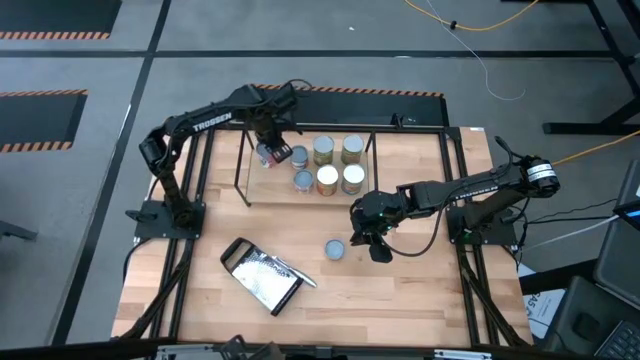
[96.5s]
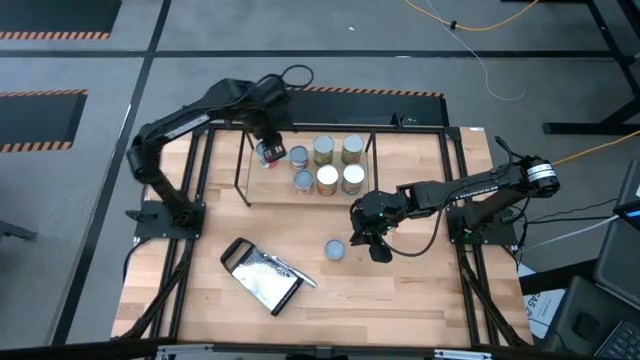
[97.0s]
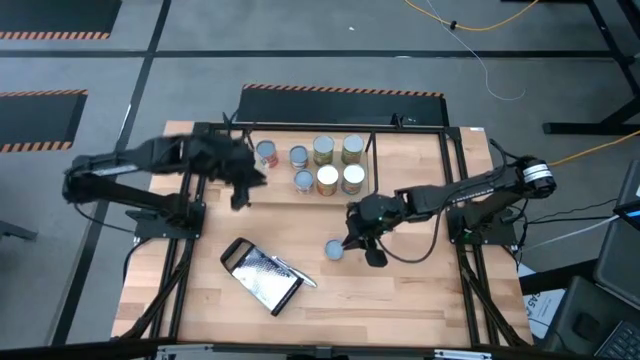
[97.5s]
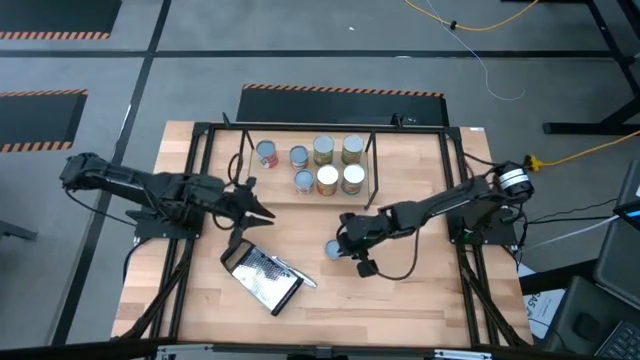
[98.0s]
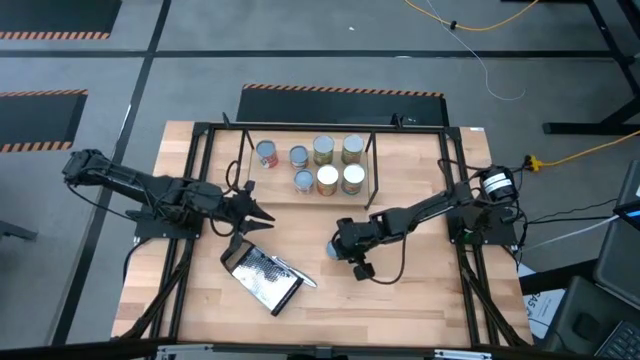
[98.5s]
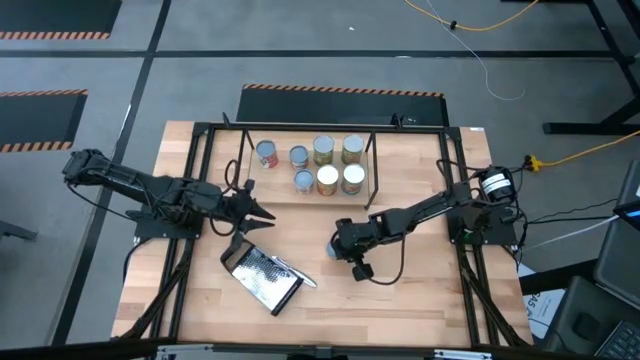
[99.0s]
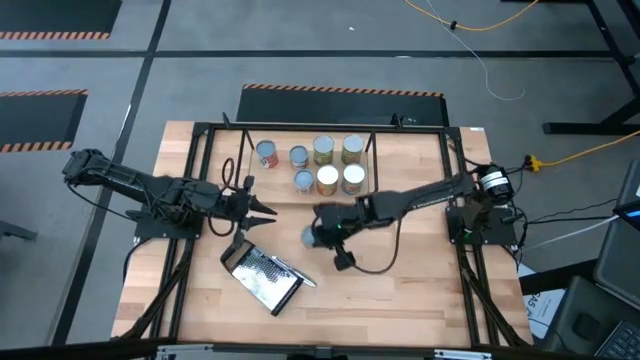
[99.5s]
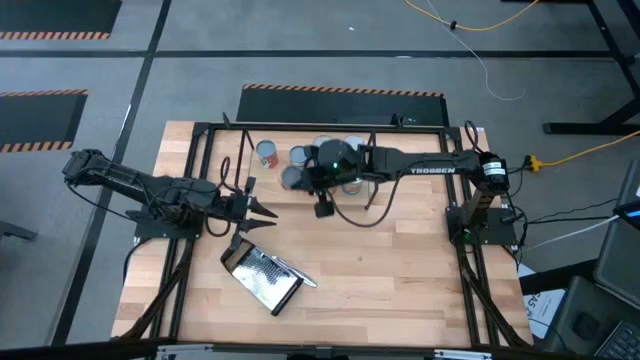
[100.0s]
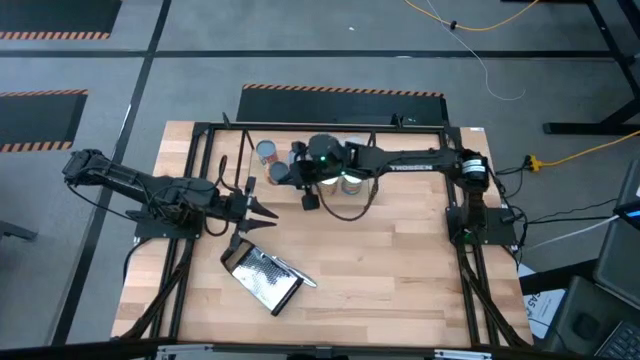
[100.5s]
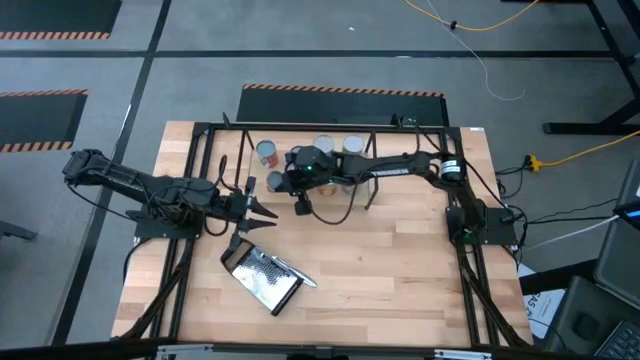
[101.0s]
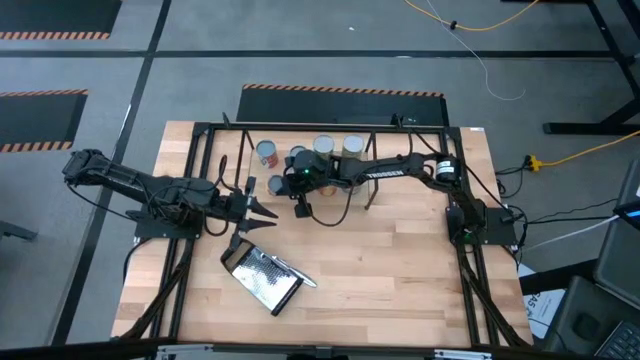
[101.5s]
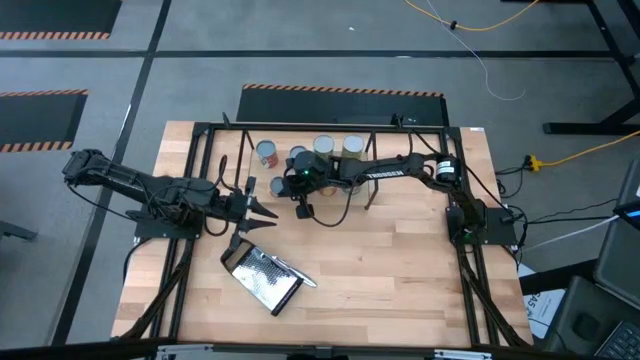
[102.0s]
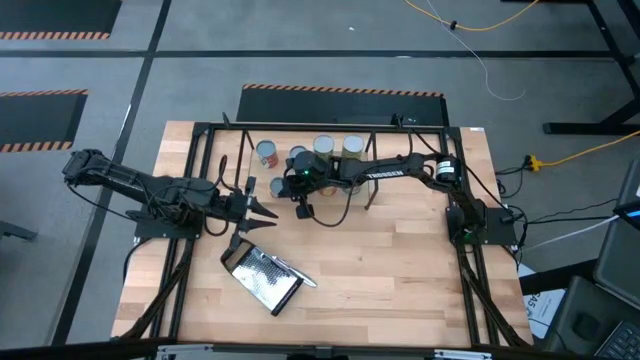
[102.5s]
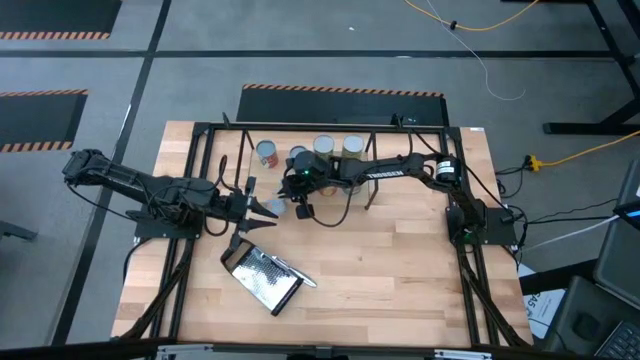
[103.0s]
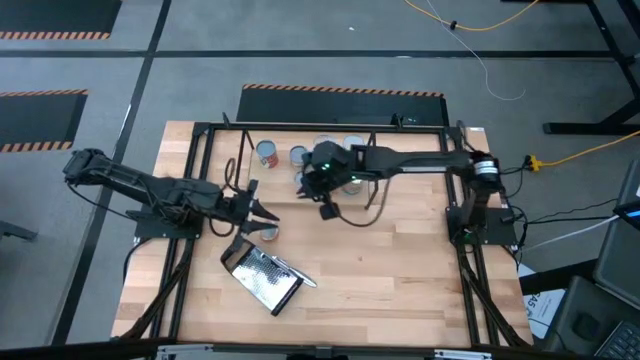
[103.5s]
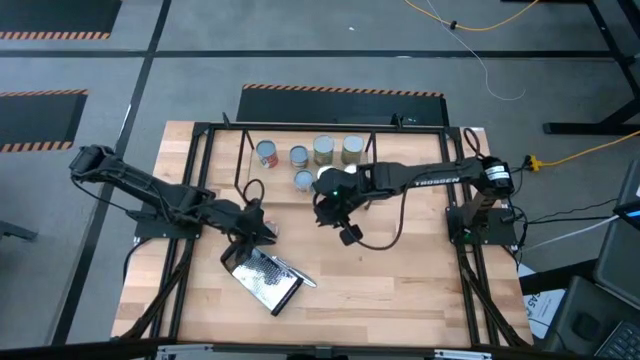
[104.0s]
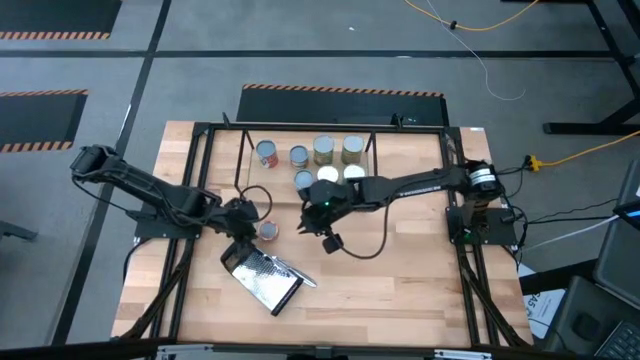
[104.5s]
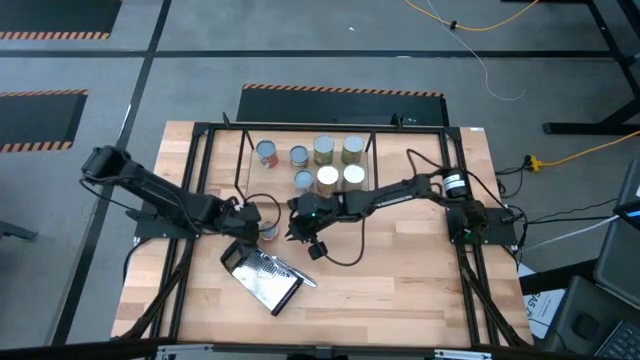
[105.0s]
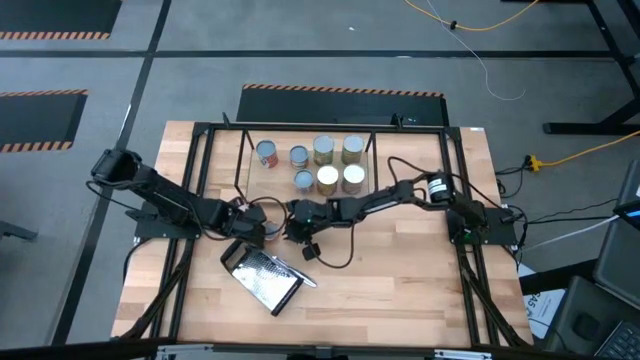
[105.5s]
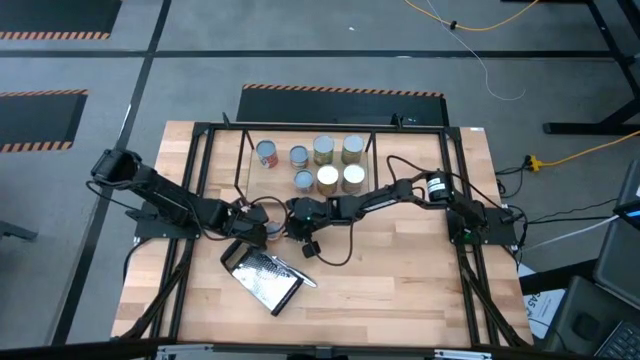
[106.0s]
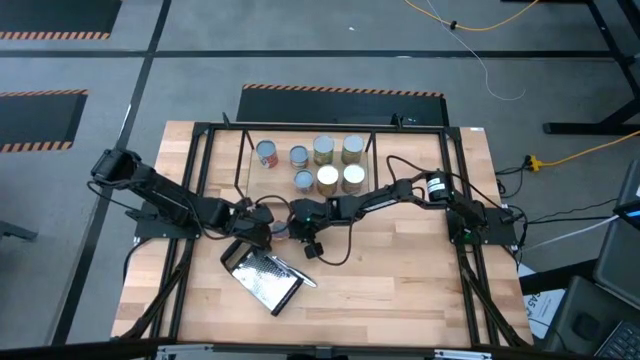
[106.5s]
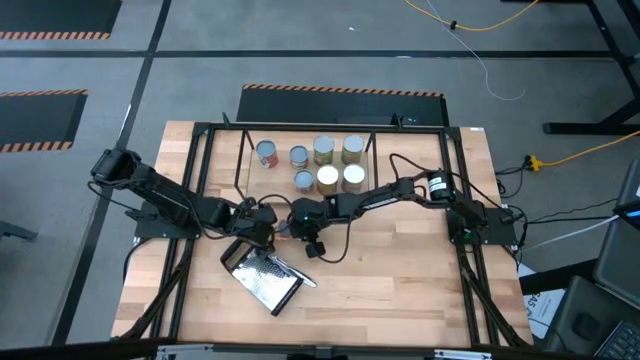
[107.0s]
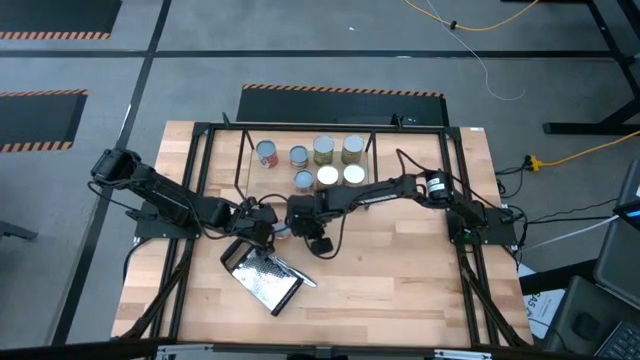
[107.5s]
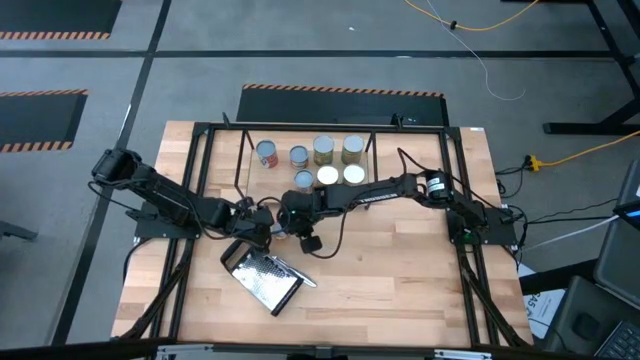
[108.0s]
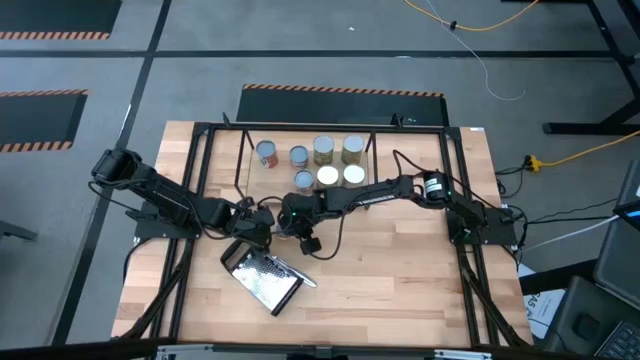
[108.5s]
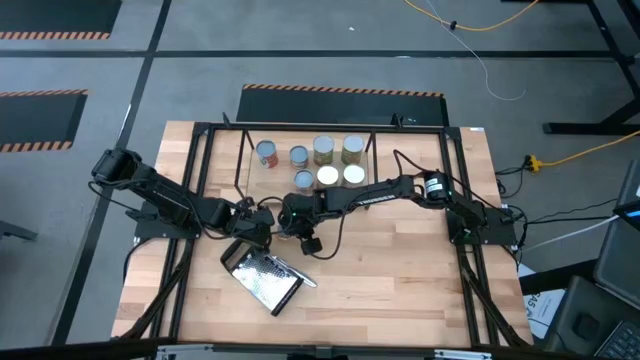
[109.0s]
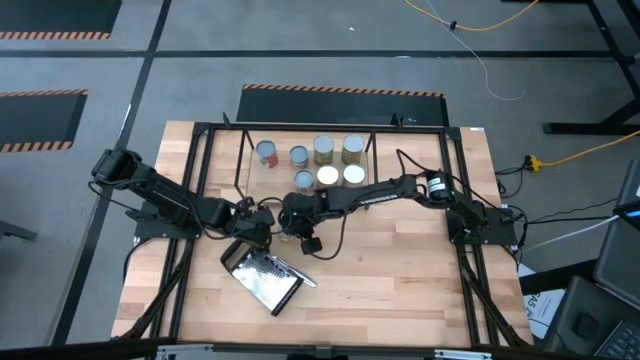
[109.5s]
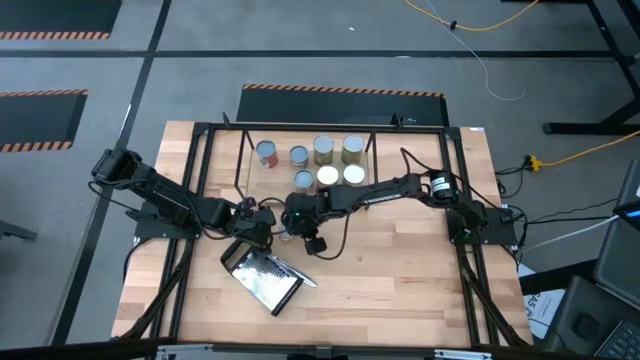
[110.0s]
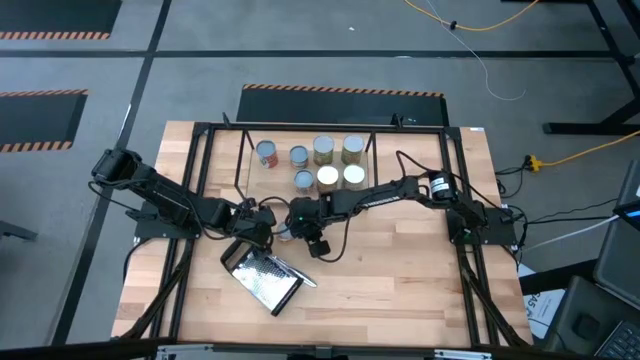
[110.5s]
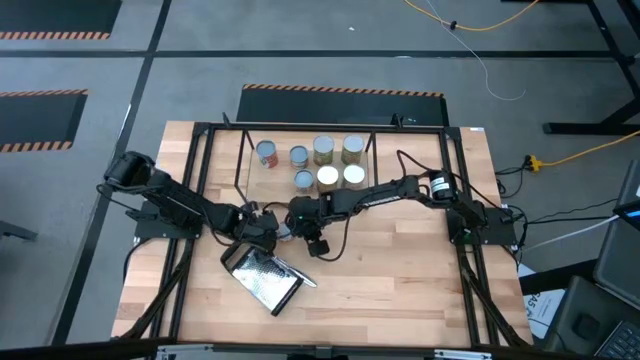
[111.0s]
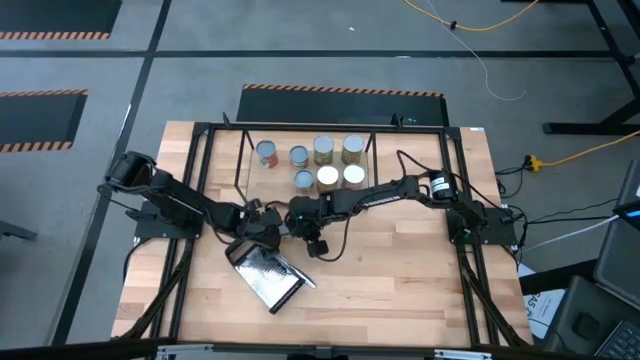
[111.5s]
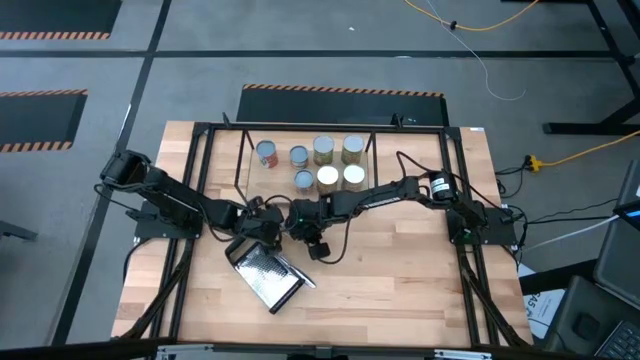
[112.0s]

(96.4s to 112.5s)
Task: Pick and place cans onto a shelf
Put the canned pineapple rings on the shelf

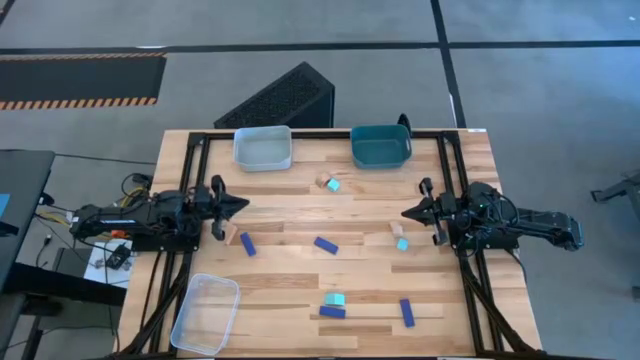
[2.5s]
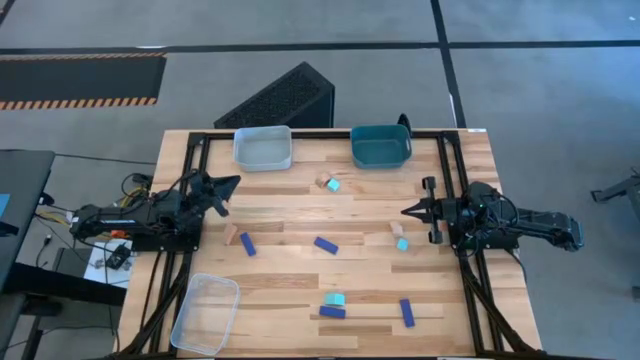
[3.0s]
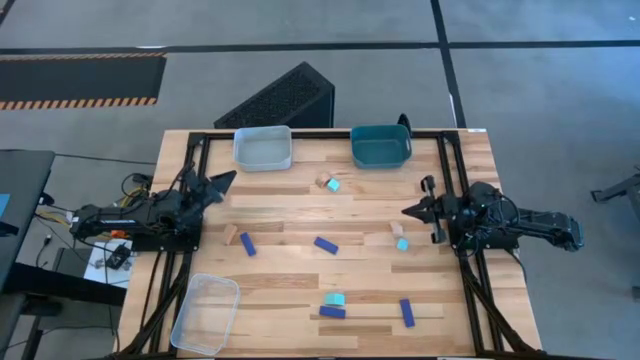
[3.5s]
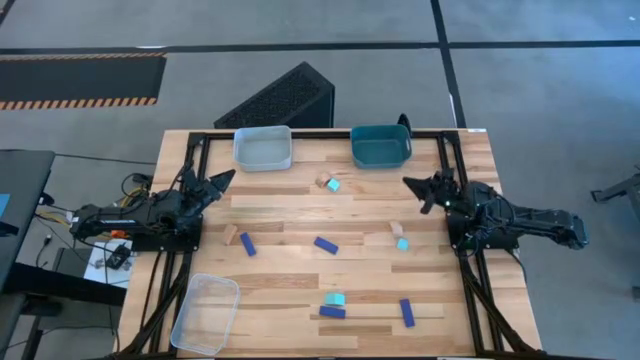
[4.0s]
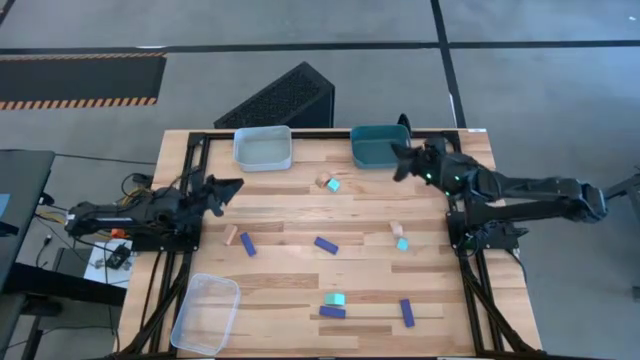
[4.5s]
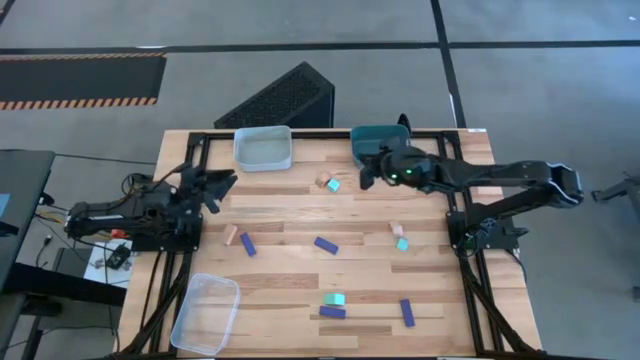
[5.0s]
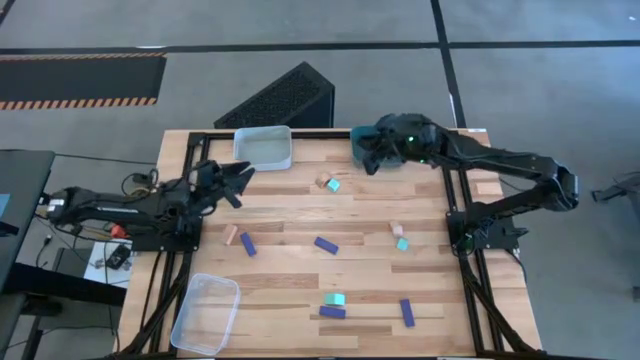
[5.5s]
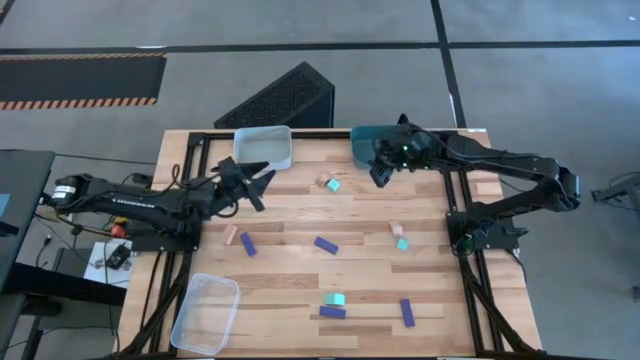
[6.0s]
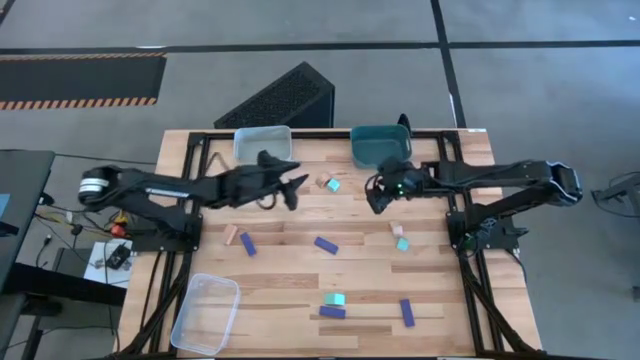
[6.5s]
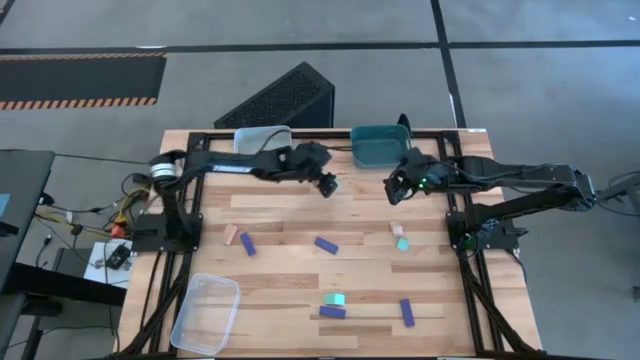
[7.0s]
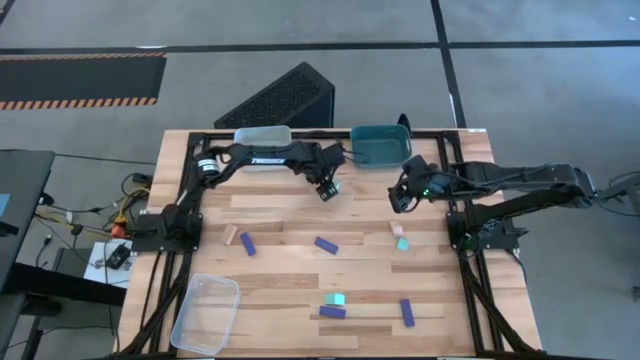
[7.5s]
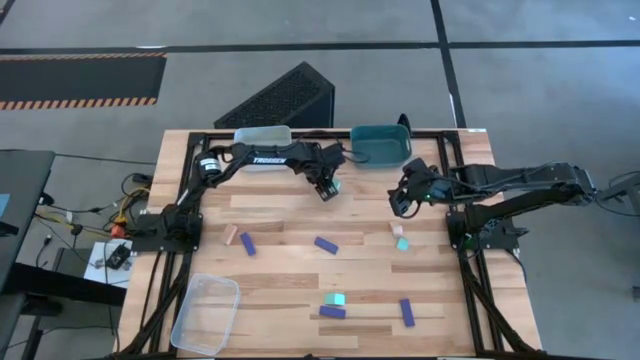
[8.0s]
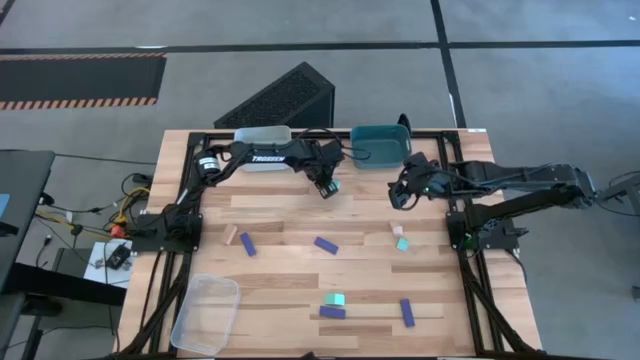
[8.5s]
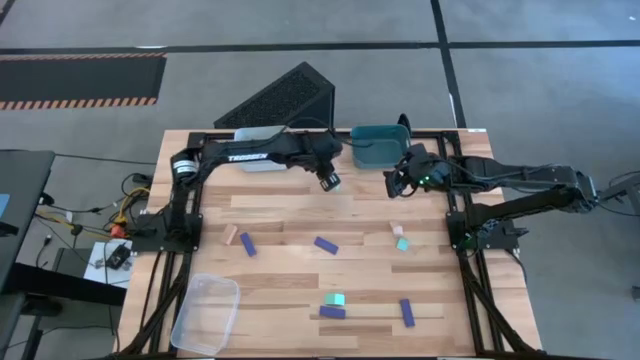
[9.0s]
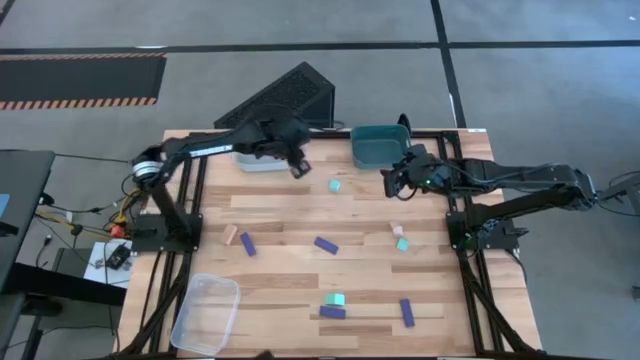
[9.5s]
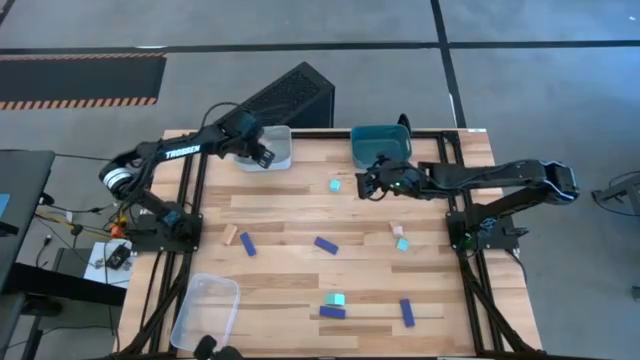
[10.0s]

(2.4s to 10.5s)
Task: Sort & place blocks by color
Put the top middle brown block into the white bin
